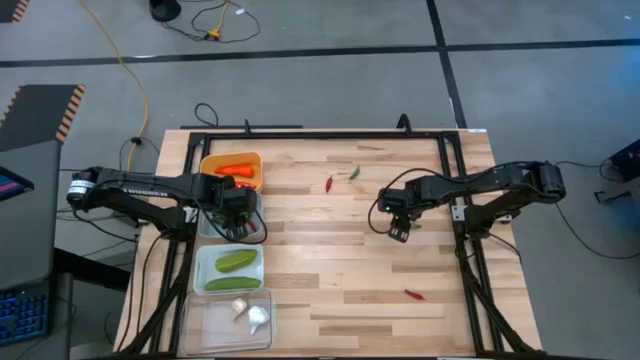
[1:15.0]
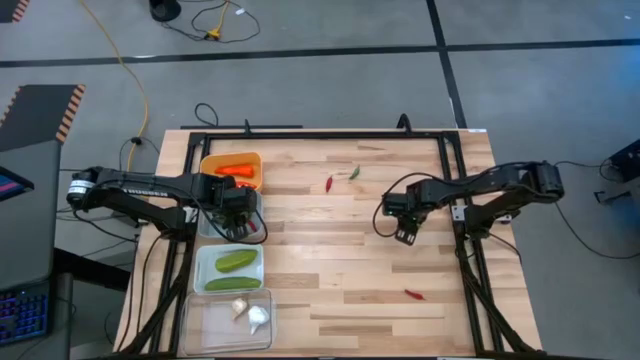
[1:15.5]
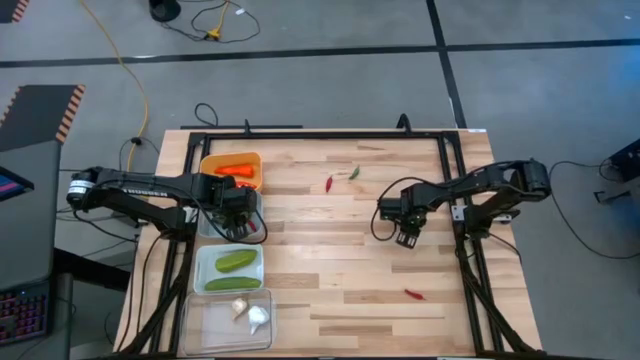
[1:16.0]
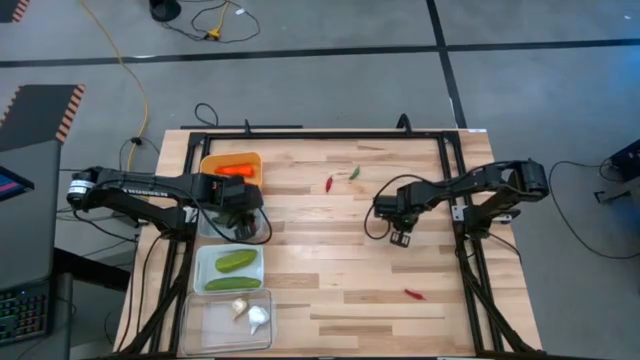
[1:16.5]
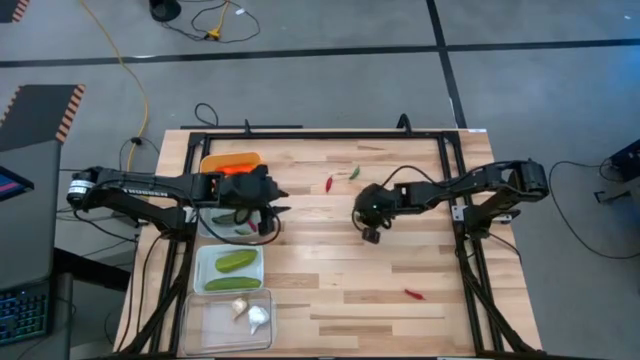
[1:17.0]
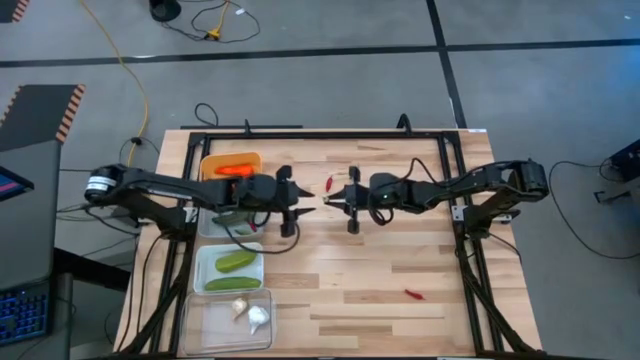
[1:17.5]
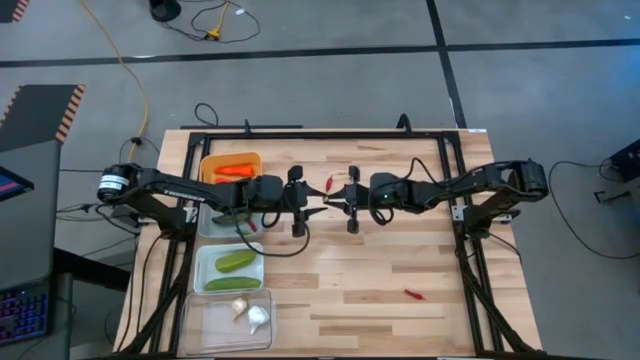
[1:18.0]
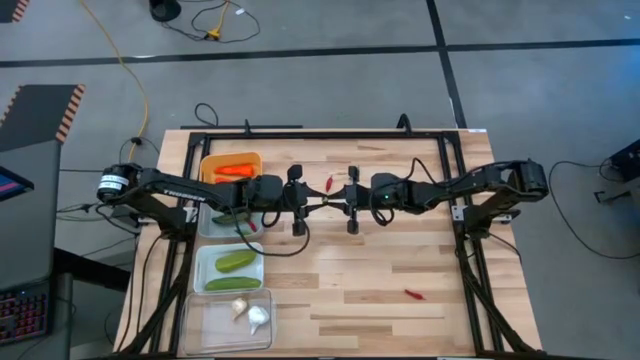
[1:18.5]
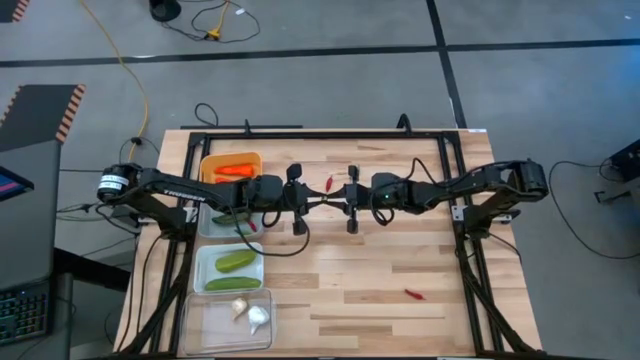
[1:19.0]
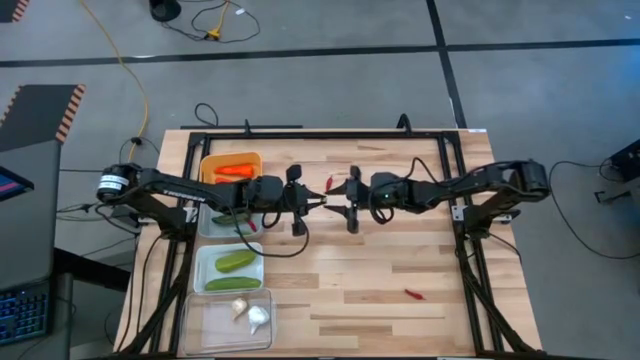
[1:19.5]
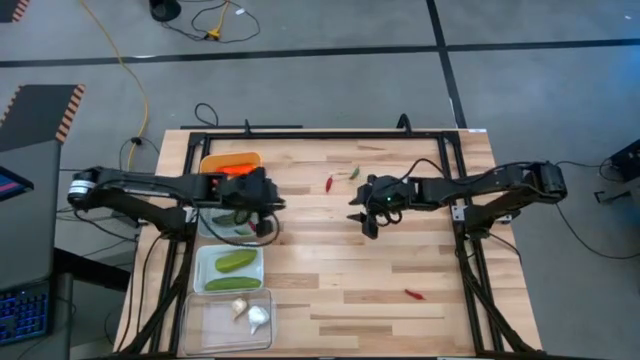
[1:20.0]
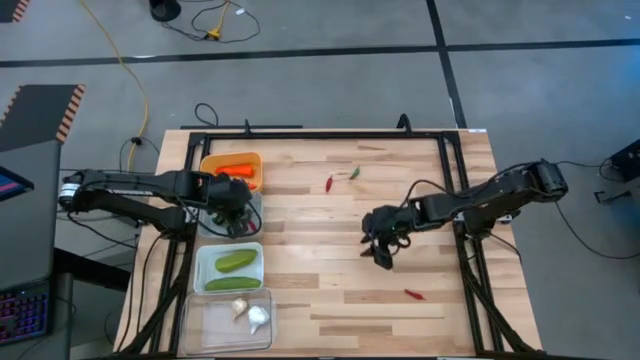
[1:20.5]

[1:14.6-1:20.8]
Task: Sort produce into baskets
Put the middle right green chili pepper into the gray bin

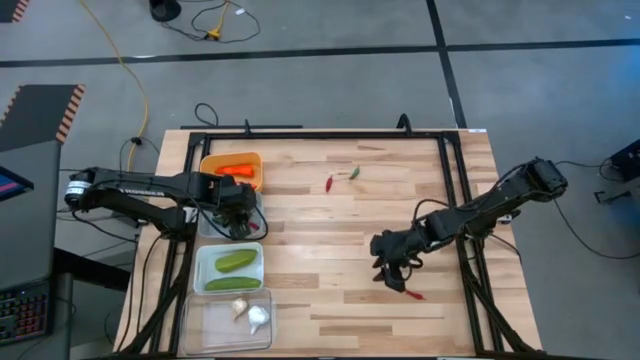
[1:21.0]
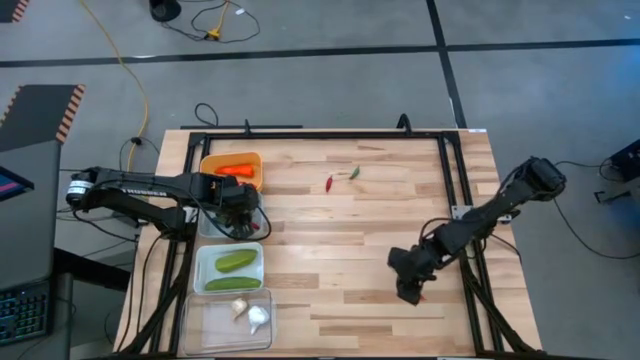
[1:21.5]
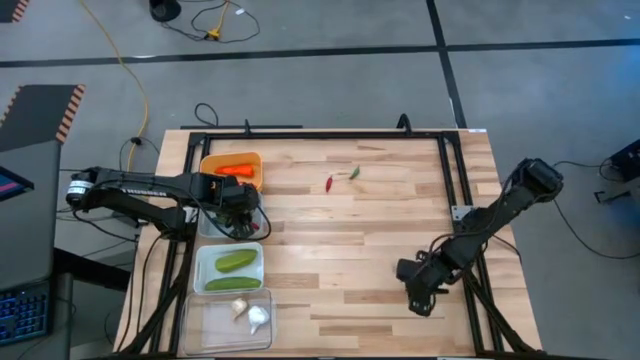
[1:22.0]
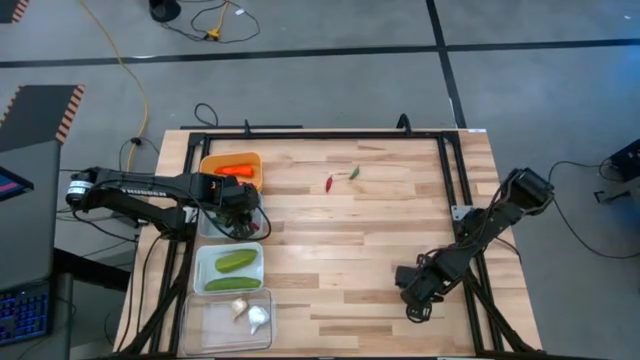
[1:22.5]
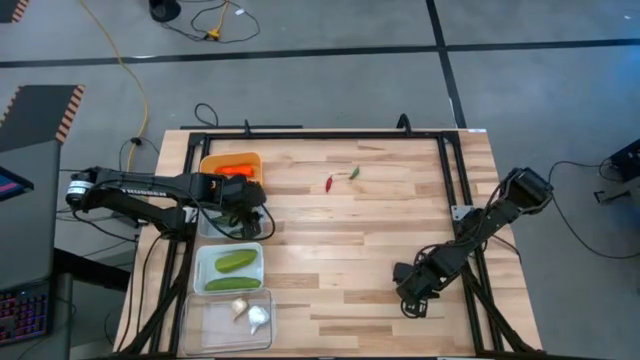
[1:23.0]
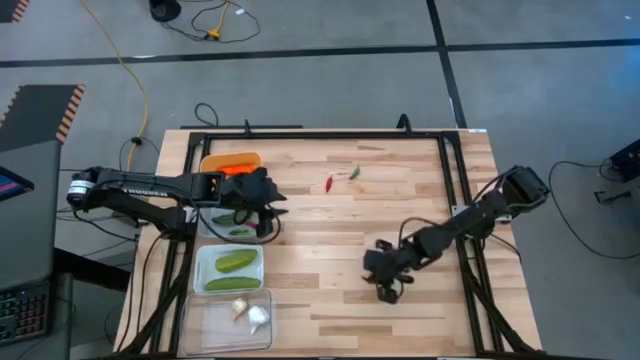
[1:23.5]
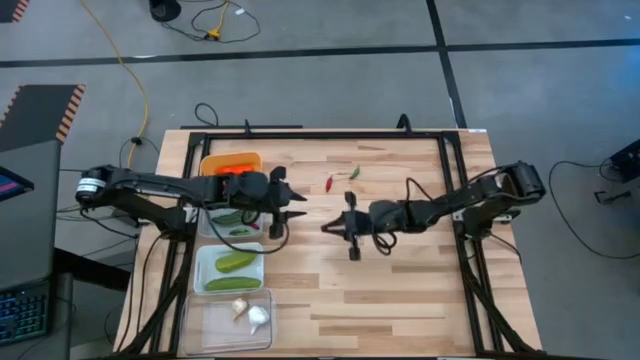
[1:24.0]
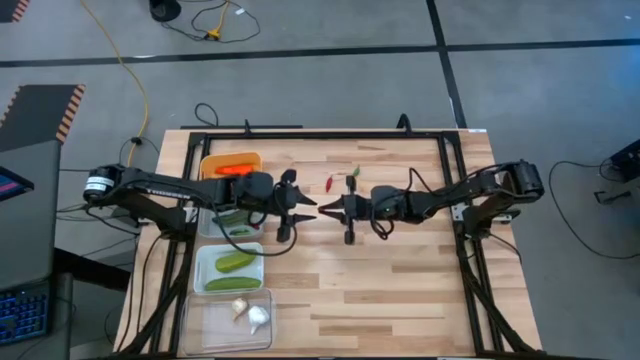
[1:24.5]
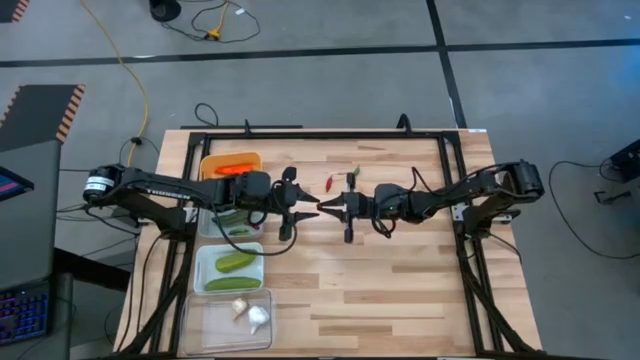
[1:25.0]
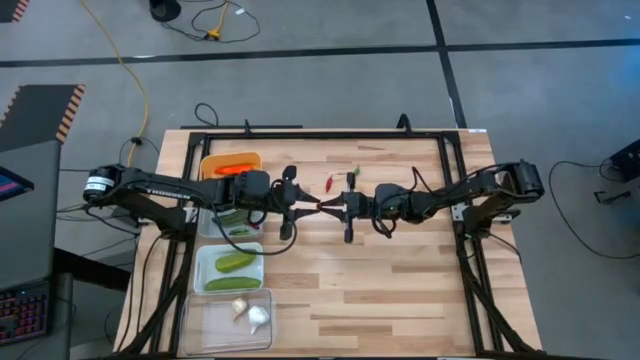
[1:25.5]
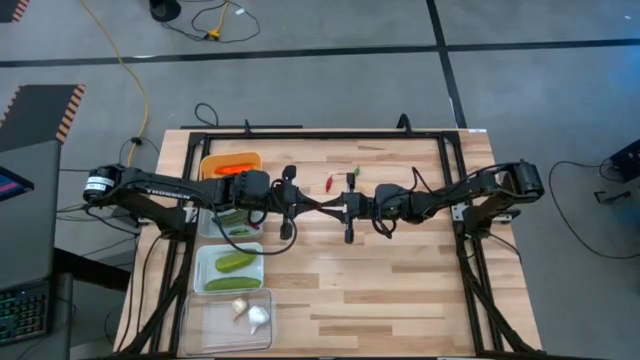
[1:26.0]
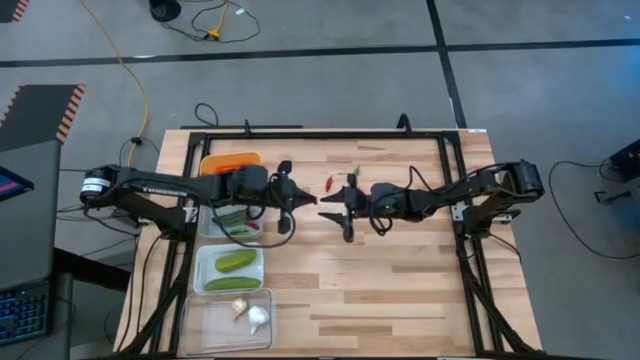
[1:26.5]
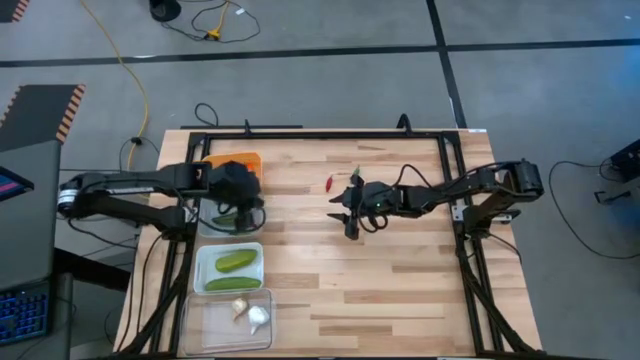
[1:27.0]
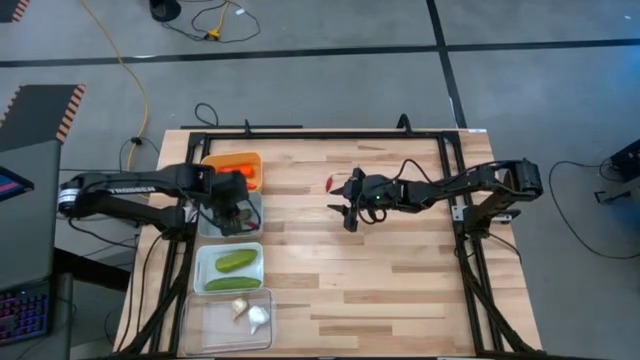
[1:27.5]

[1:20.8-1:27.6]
Put the bottom right red chili pepper into the gray bin

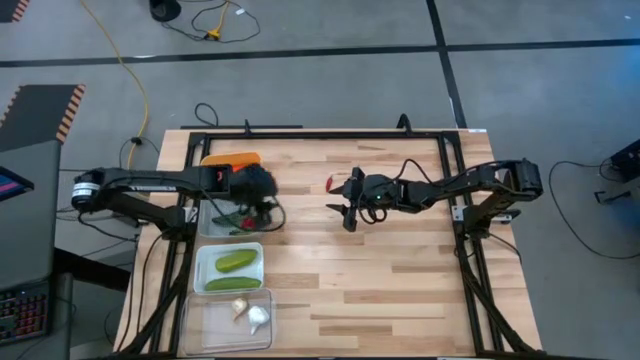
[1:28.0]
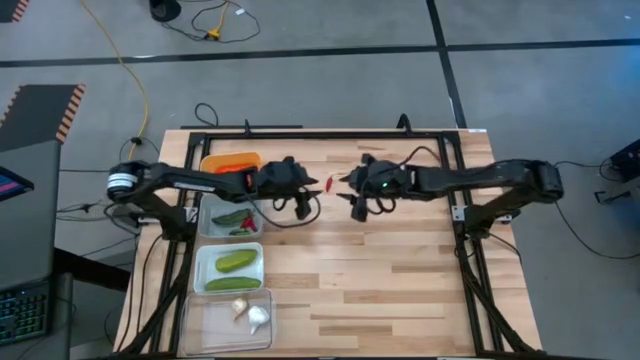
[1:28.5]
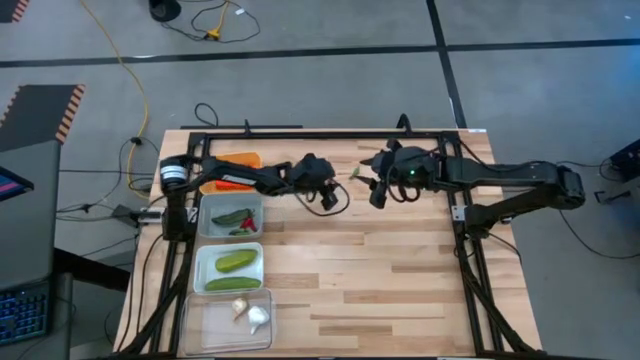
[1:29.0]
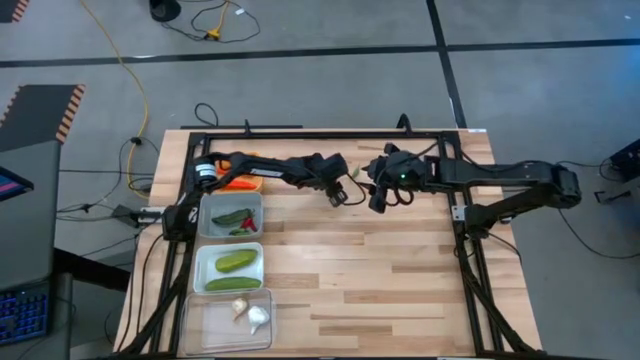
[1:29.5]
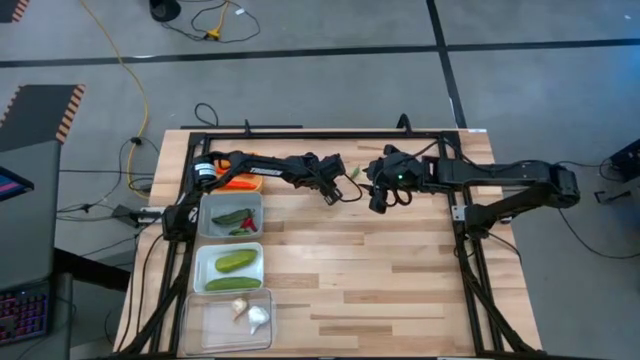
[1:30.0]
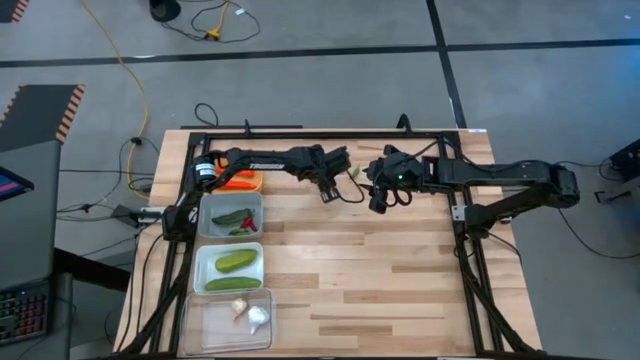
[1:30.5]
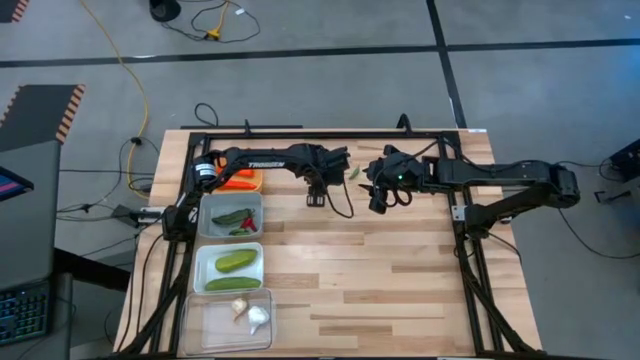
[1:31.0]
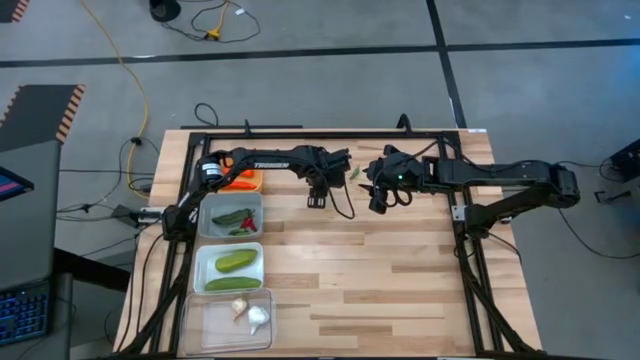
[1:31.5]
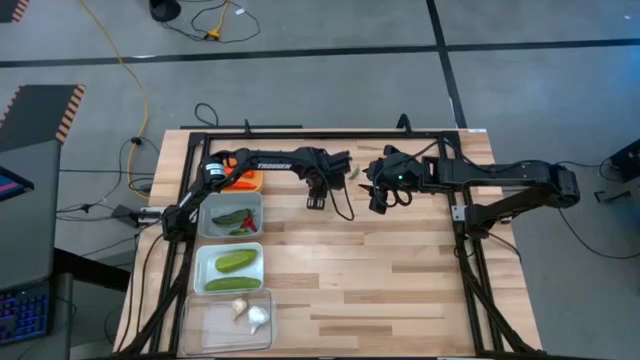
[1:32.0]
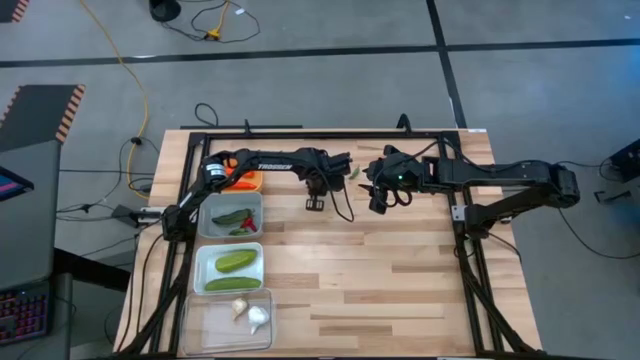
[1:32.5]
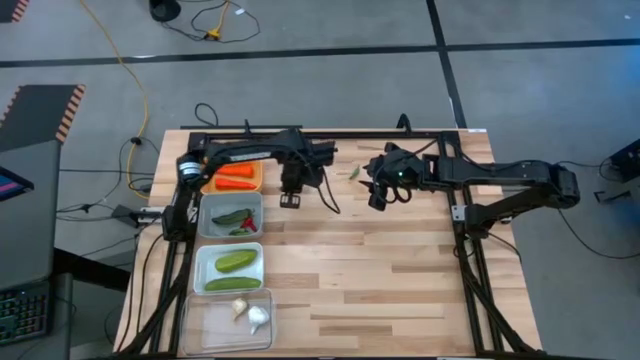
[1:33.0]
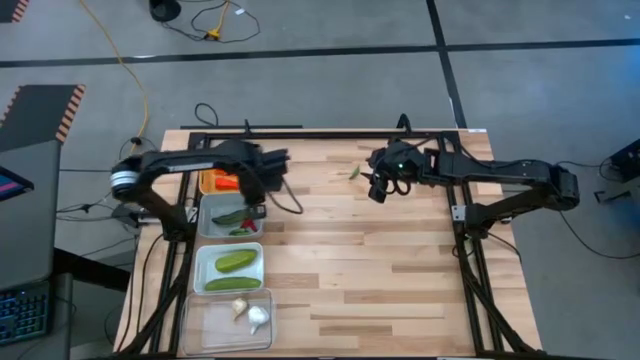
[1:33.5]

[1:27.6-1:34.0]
Put the red chili pepper into the gray bin

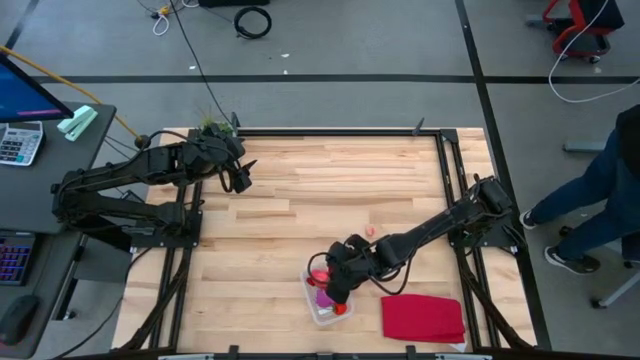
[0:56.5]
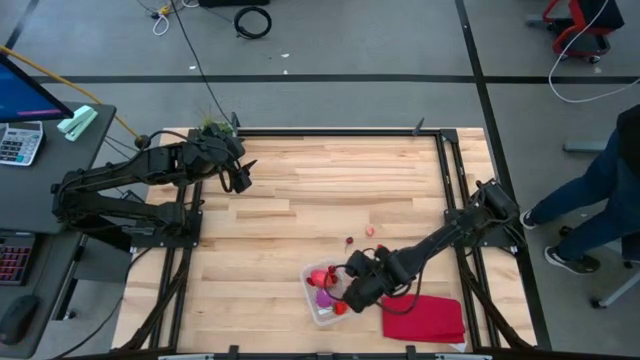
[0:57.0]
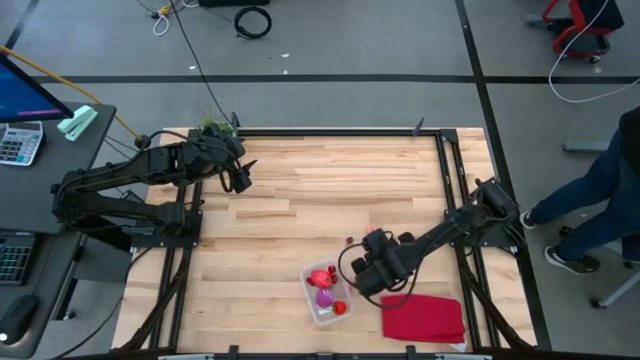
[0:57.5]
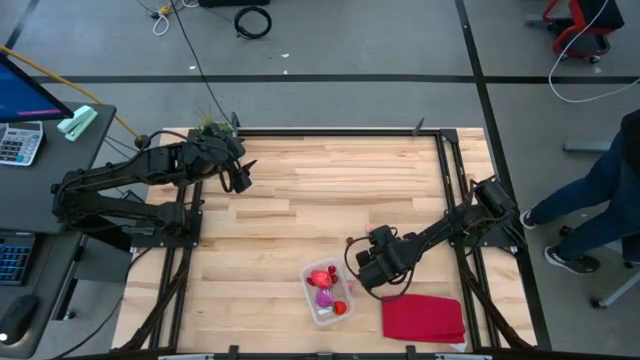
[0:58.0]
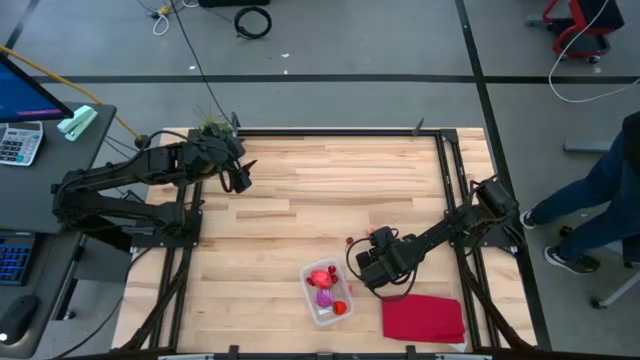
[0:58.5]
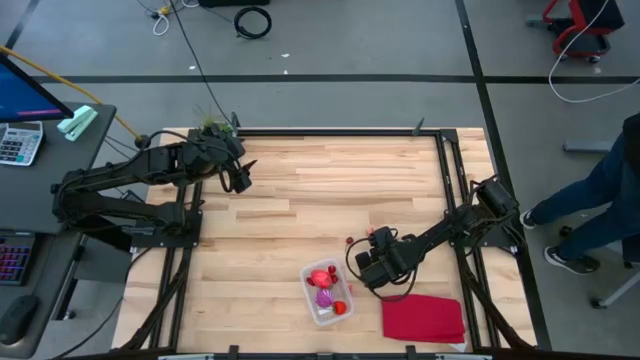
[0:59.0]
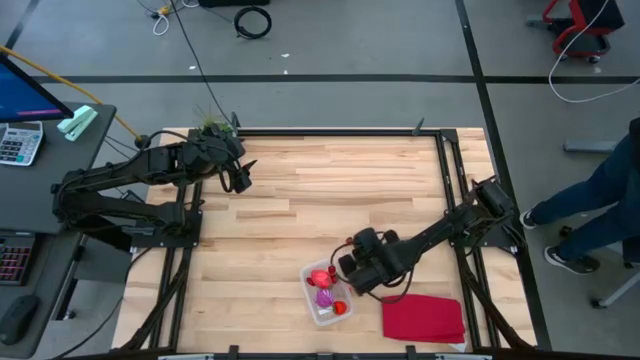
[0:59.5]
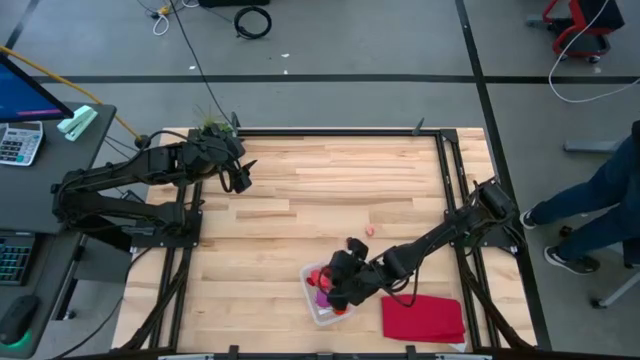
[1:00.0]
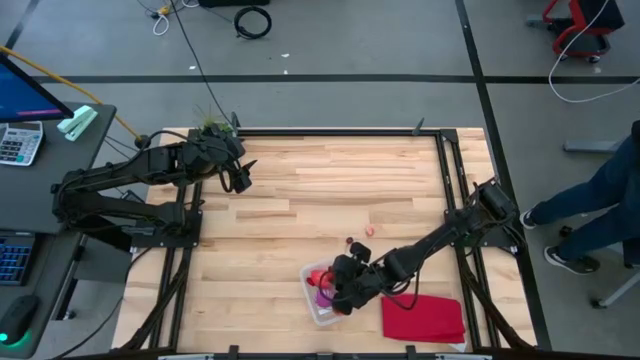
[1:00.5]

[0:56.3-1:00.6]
Task: Pick and placing Produce into tupperware
Put the red raspberry into the transparent bin
